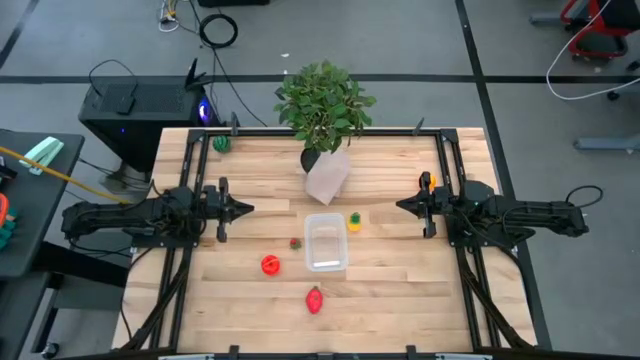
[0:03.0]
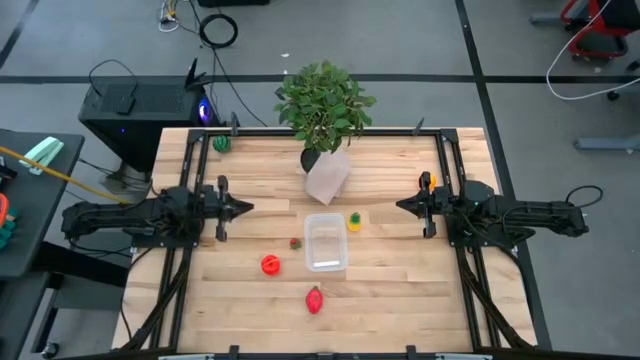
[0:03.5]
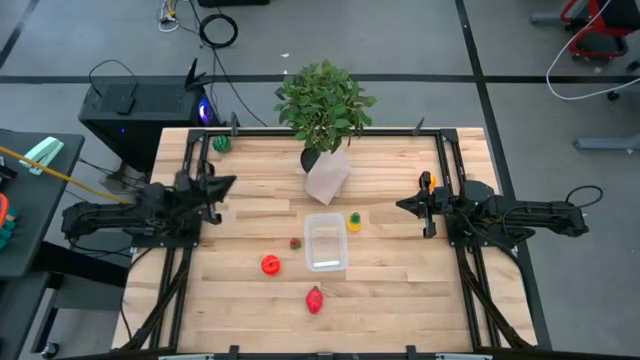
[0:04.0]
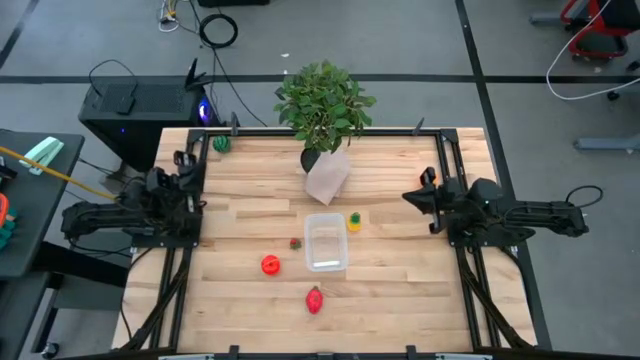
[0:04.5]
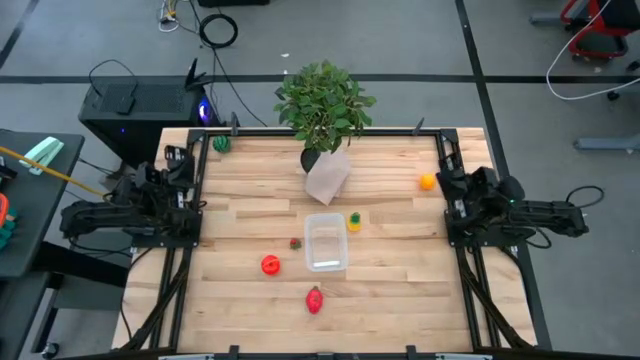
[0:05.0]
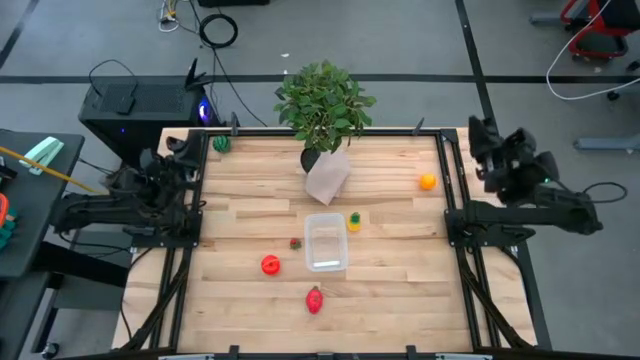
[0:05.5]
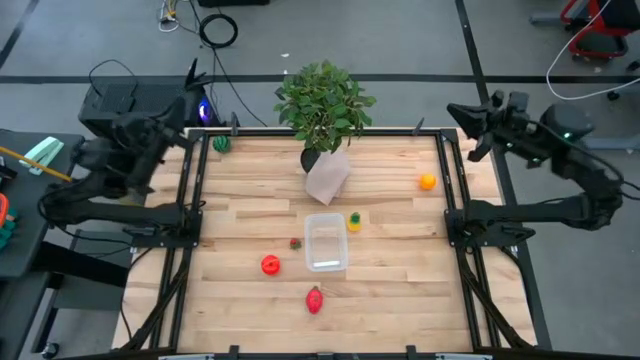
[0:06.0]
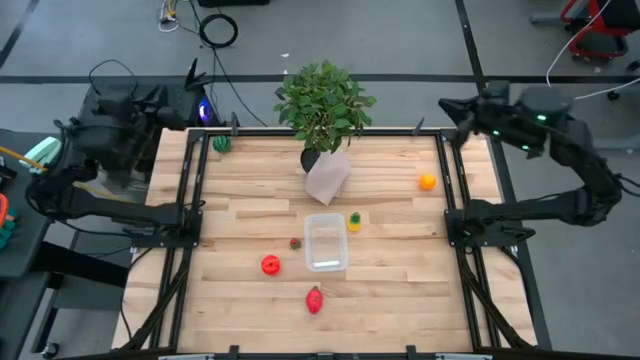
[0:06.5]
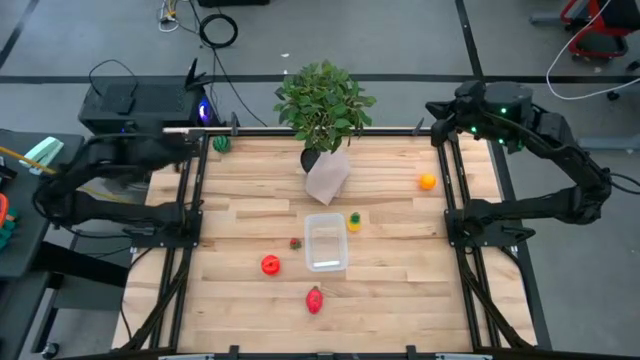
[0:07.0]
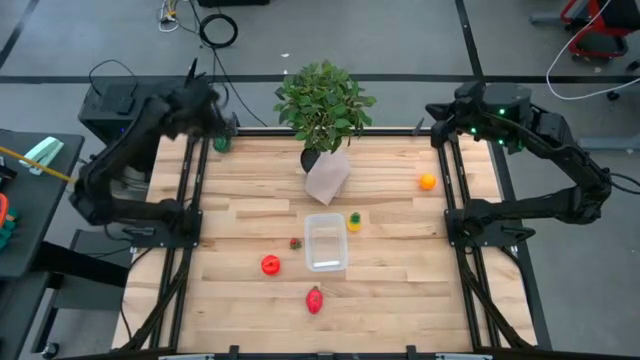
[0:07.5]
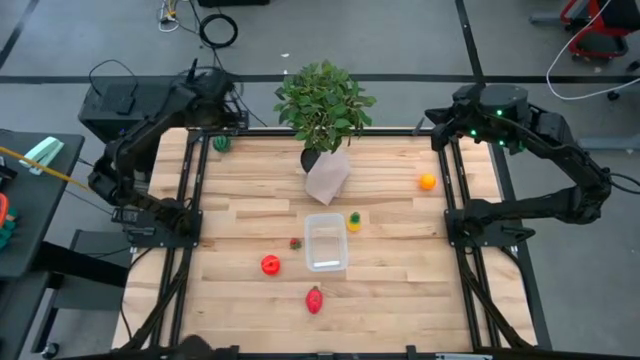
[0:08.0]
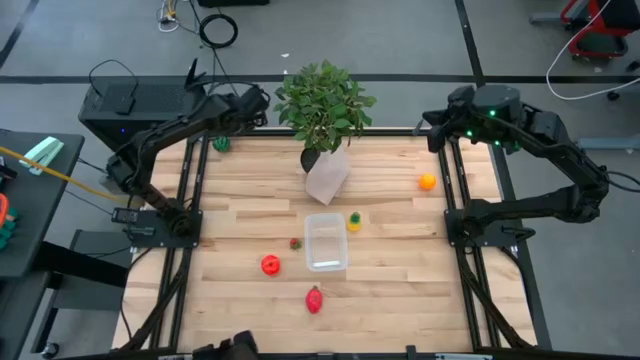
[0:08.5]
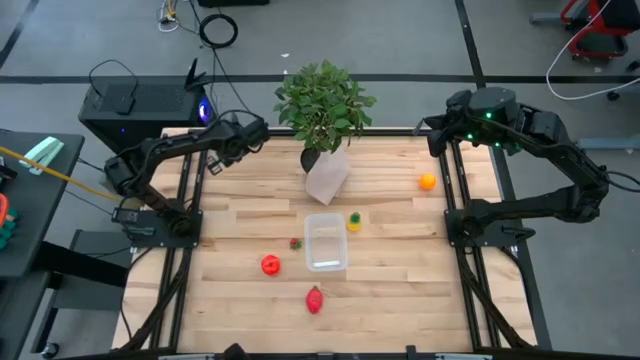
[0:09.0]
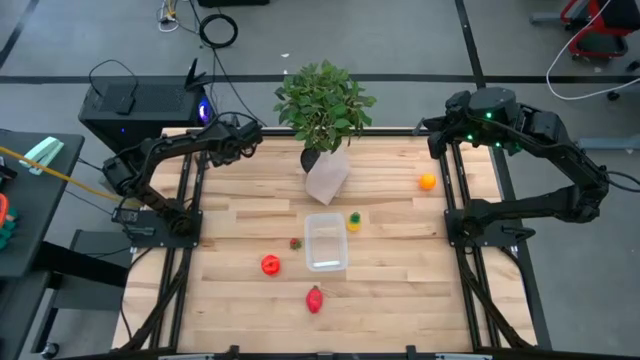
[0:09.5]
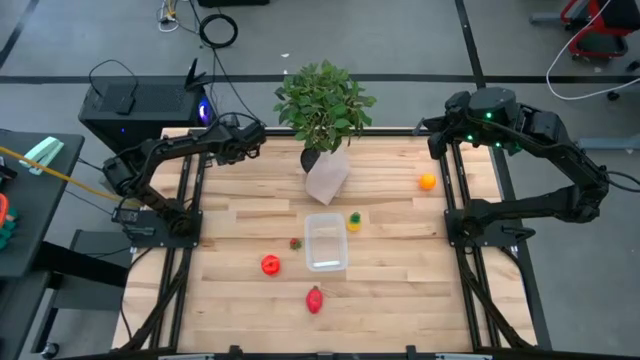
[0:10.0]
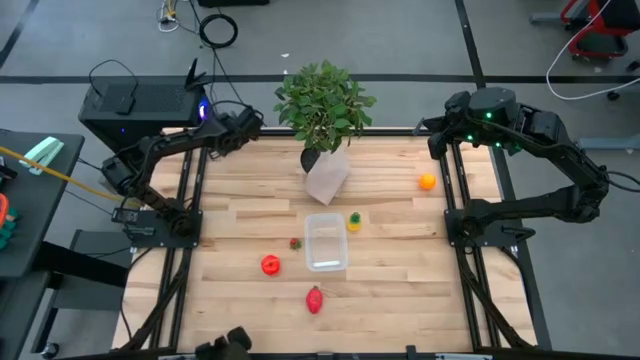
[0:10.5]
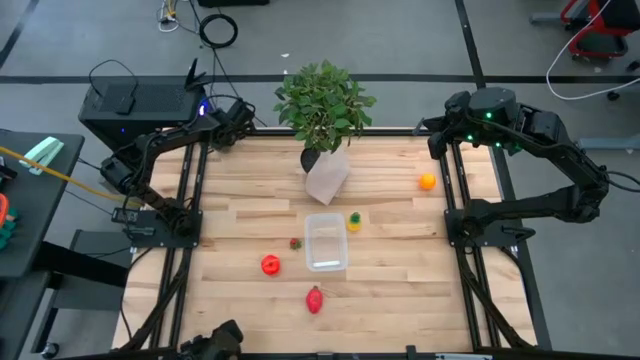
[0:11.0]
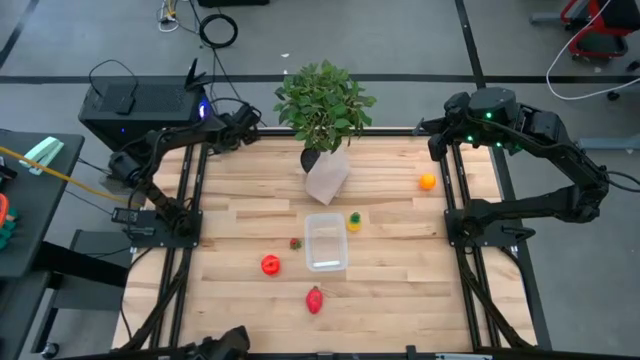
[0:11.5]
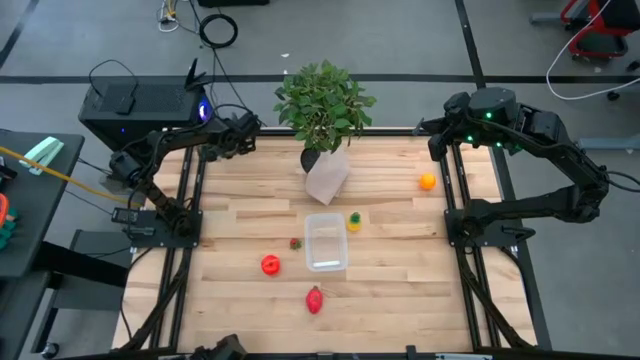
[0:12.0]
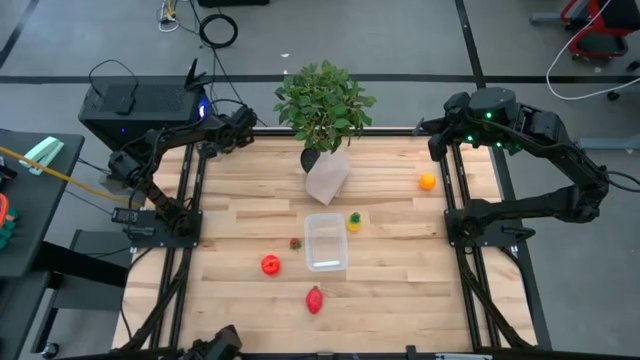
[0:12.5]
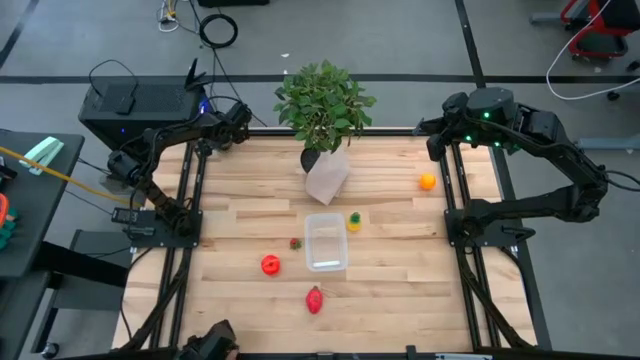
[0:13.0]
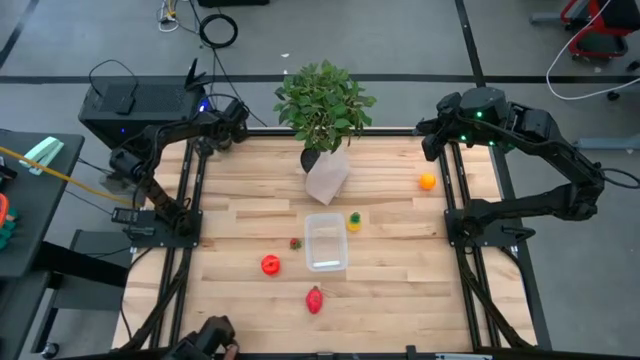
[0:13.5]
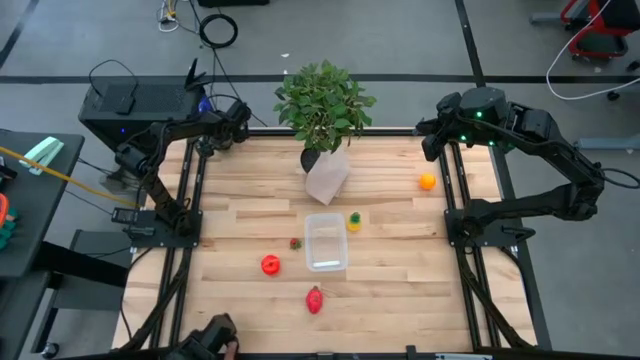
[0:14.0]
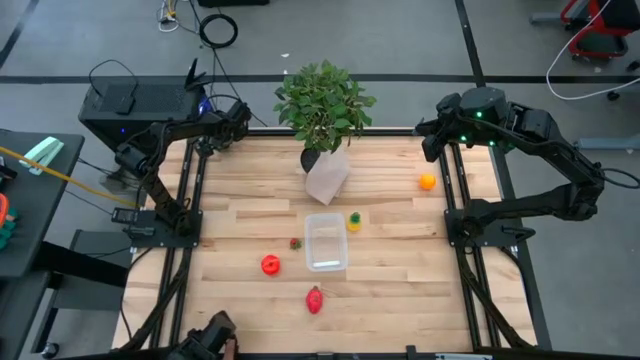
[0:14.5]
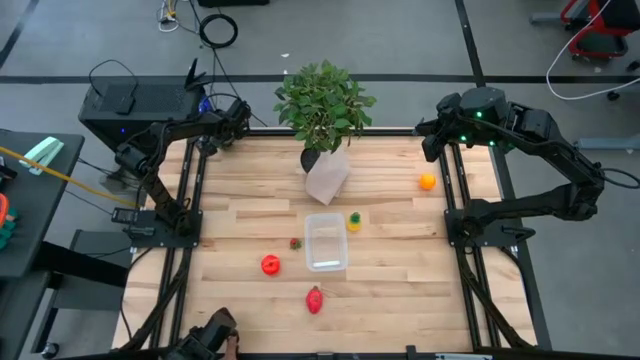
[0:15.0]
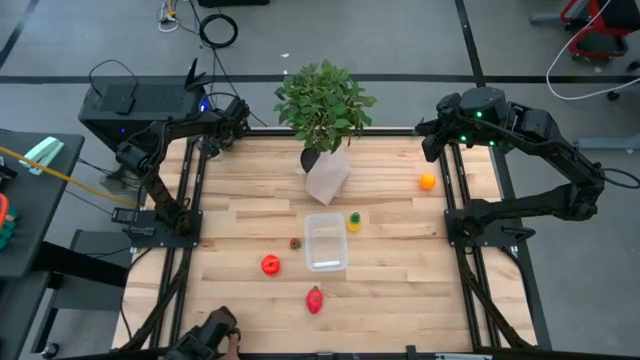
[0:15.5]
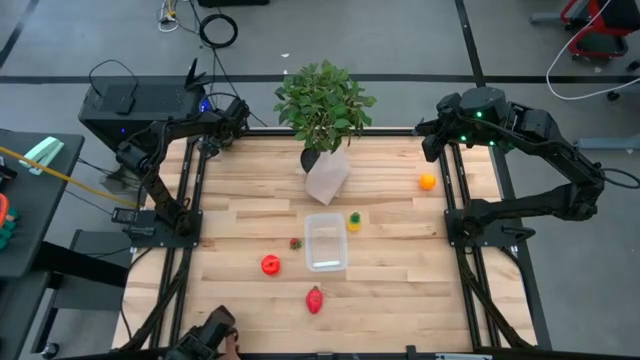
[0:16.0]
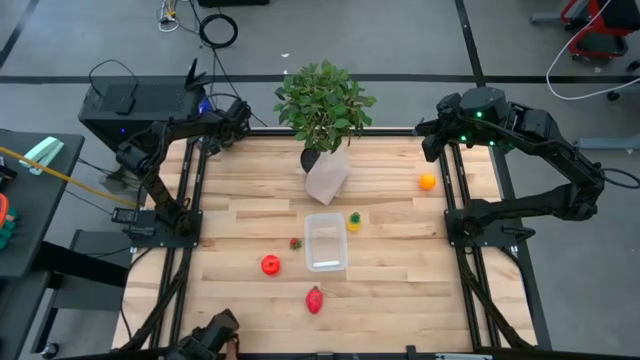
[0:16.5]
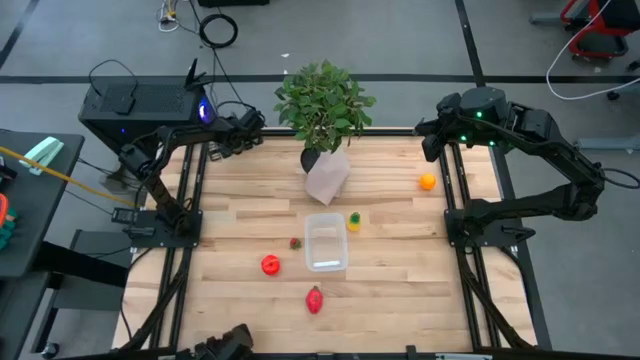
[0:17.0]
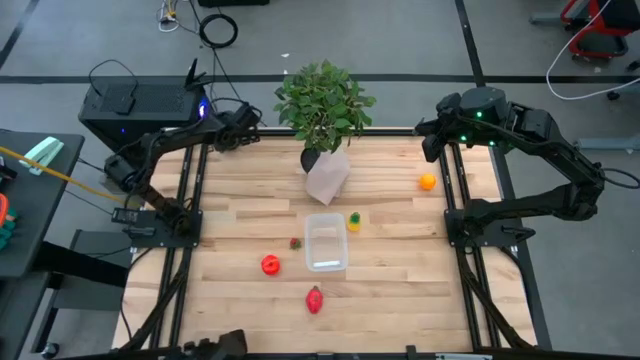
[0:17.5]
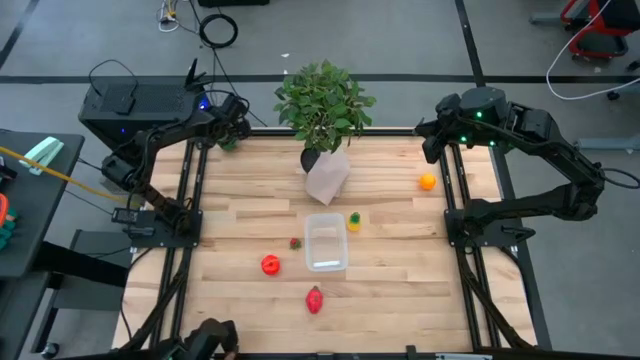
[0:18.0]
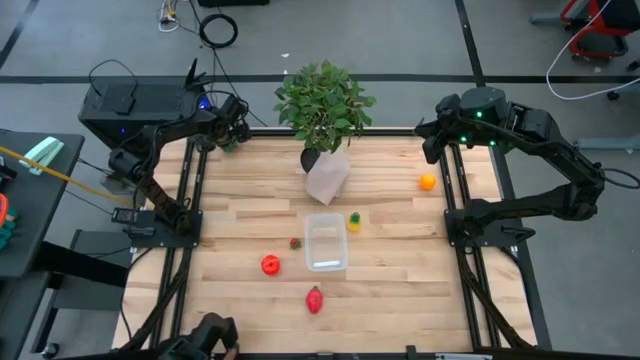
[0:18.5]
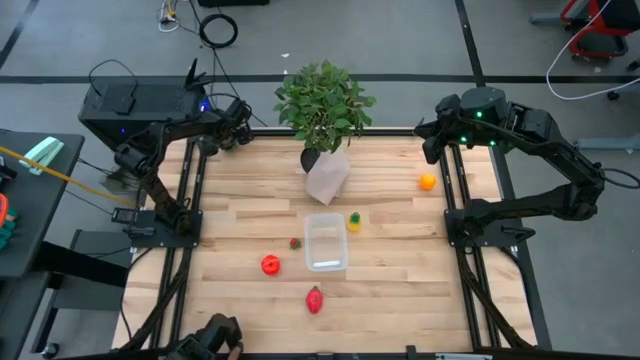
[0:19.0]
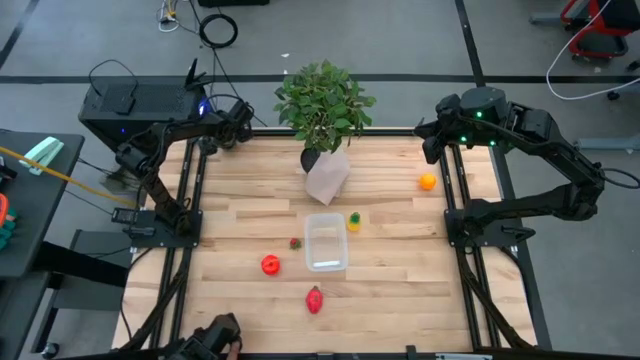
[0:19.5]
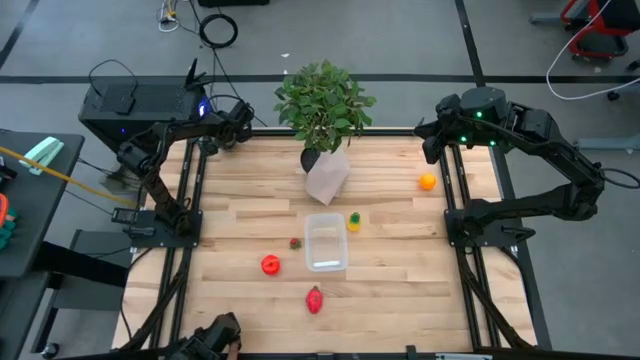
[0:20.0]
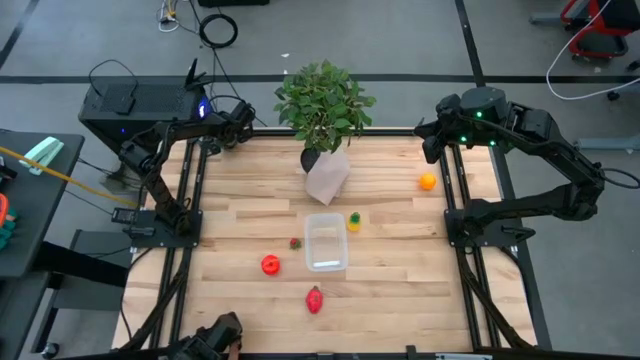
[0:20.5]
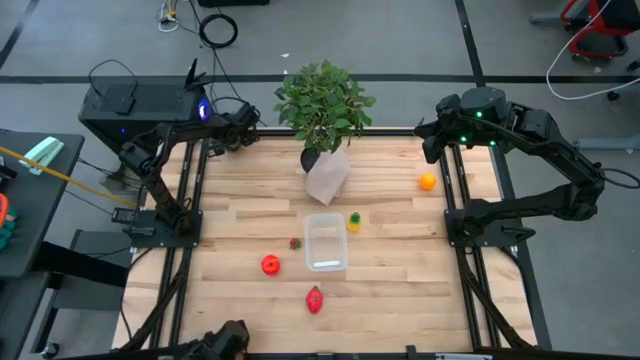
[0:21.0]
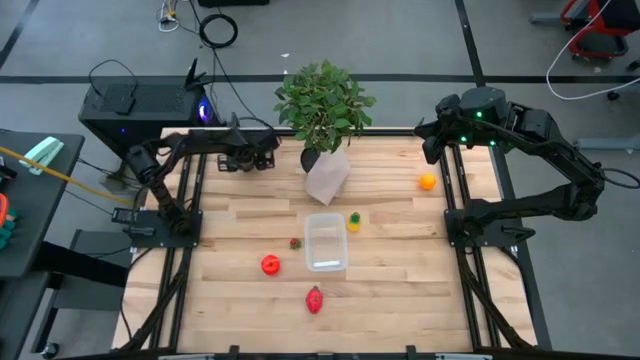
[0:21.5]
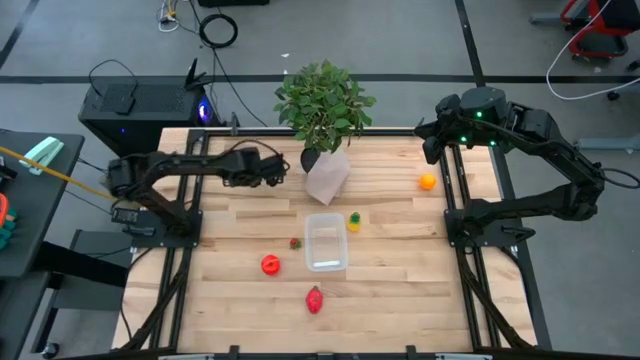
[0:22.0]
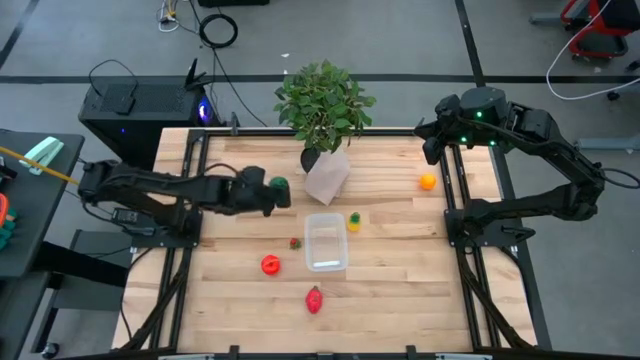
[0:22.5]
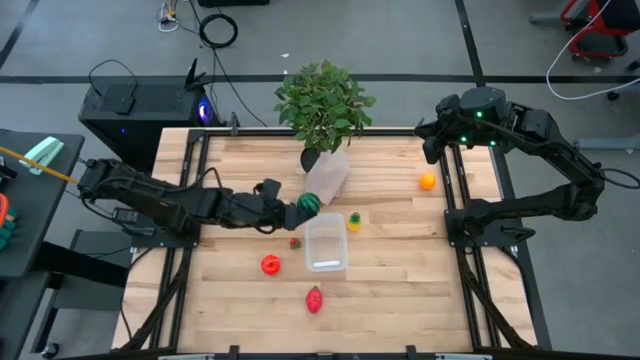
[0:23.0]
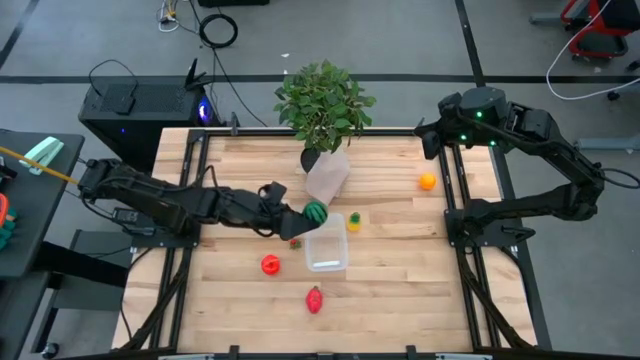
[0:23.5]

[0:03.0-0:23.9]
Task: Pick and placing Produce into tupperware
Put the green watermelon into the transparent bin
